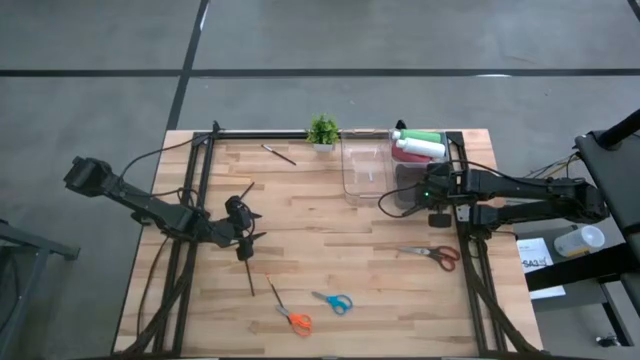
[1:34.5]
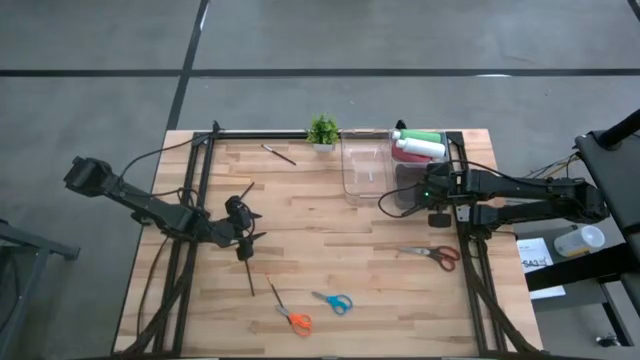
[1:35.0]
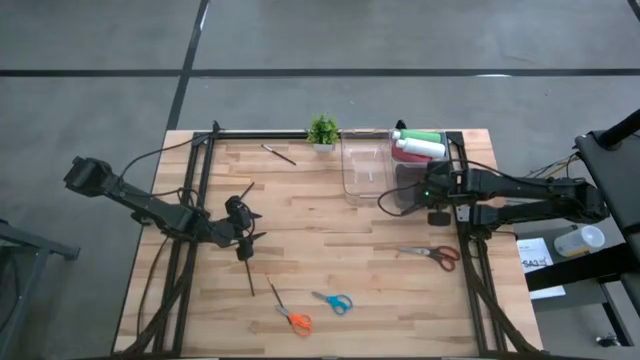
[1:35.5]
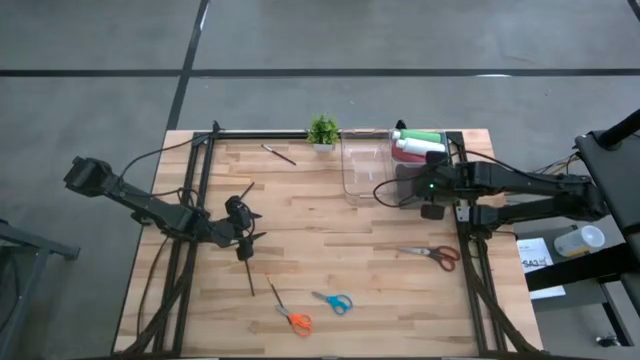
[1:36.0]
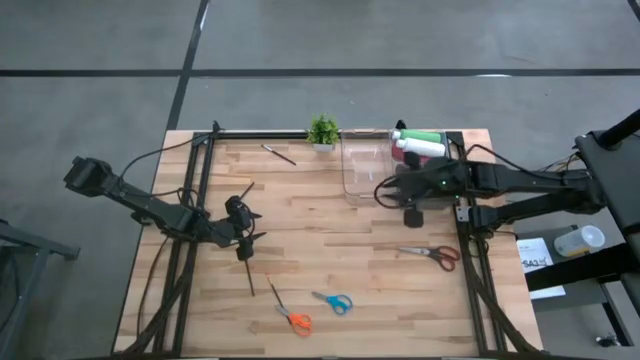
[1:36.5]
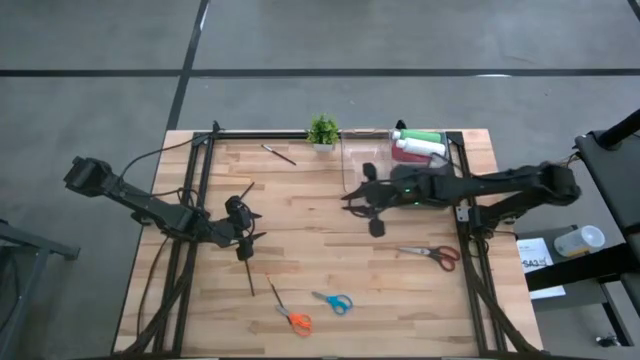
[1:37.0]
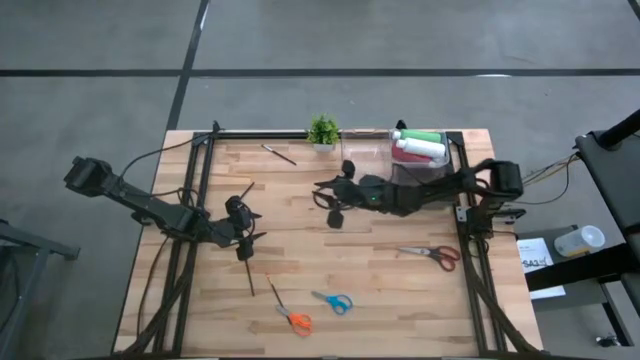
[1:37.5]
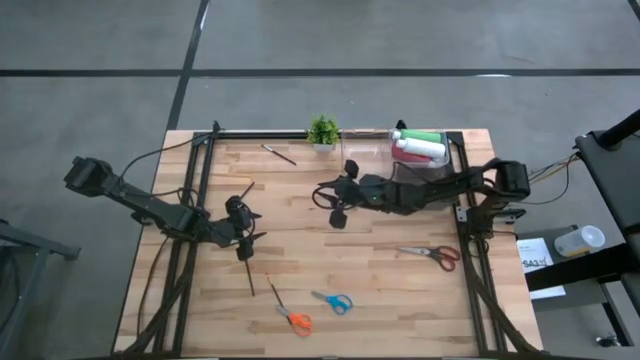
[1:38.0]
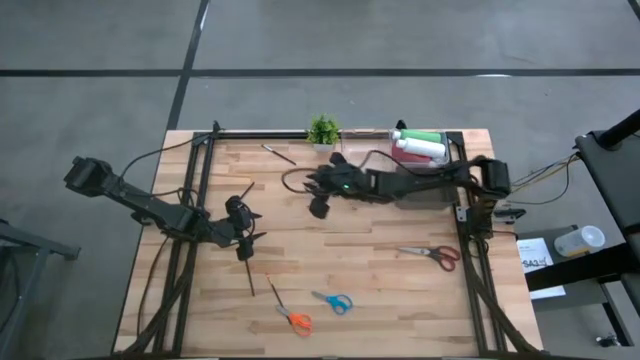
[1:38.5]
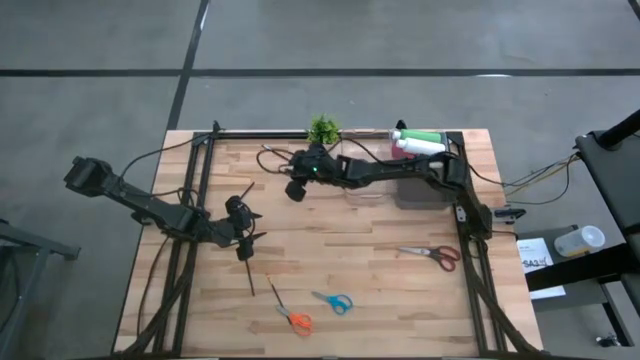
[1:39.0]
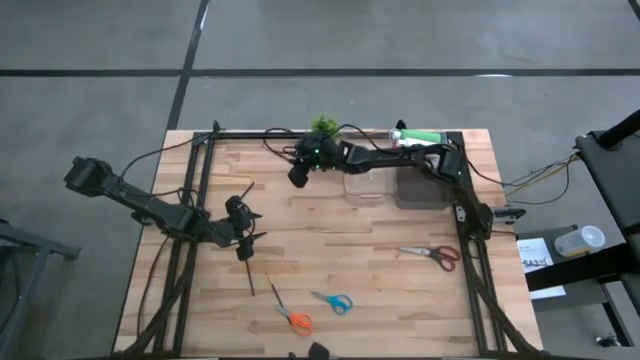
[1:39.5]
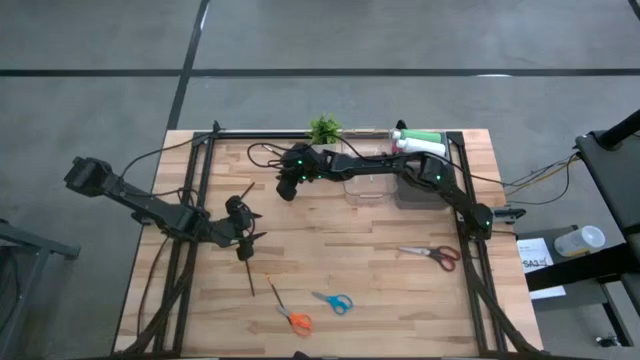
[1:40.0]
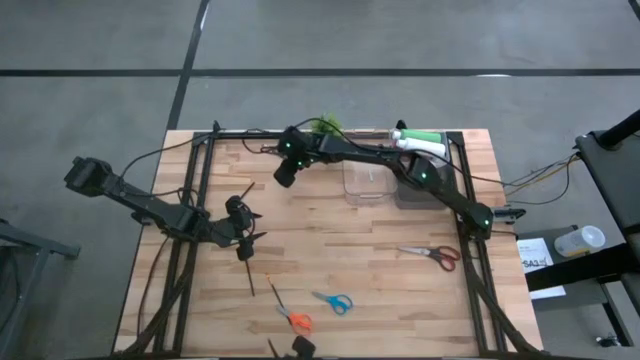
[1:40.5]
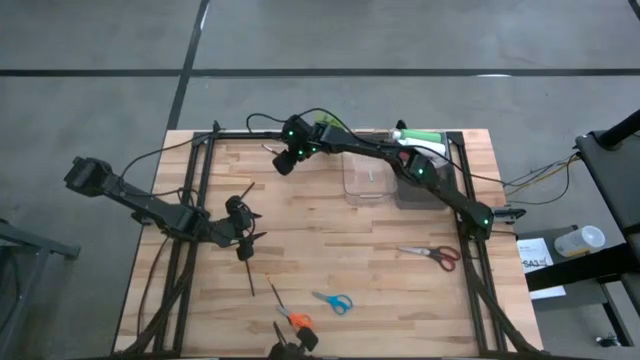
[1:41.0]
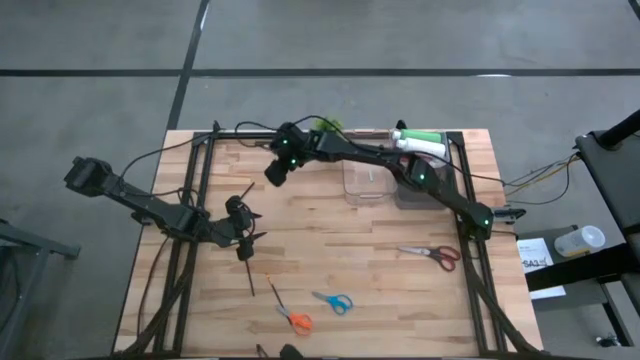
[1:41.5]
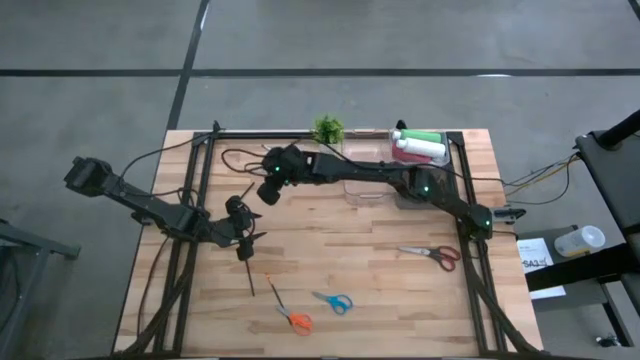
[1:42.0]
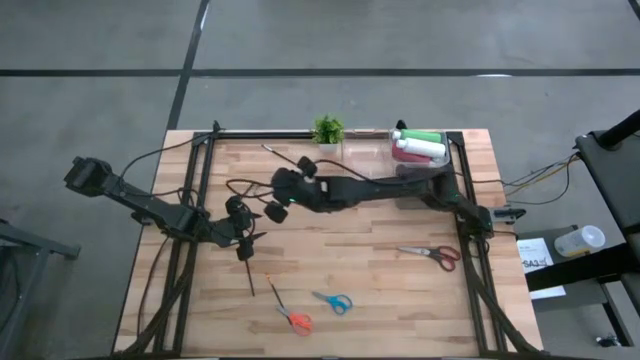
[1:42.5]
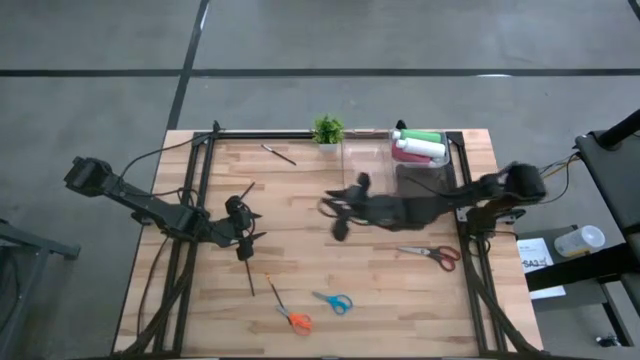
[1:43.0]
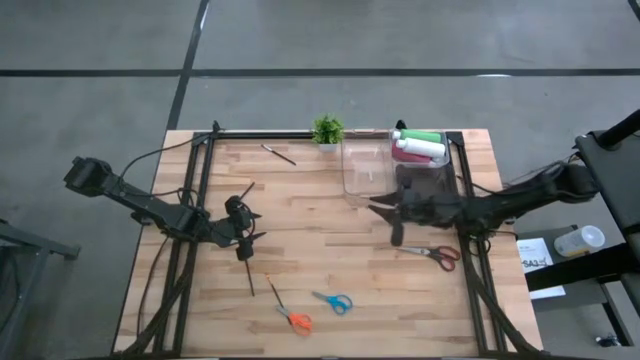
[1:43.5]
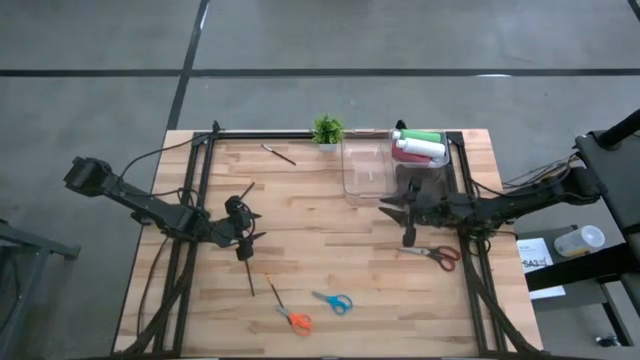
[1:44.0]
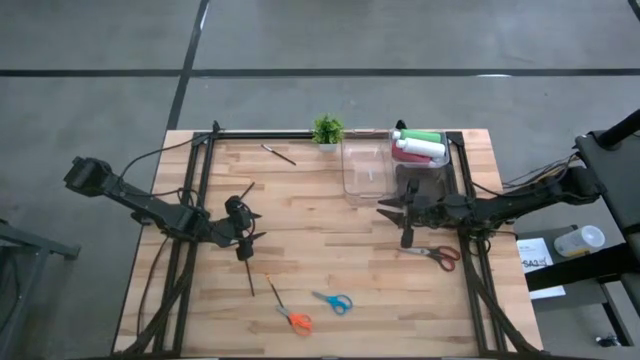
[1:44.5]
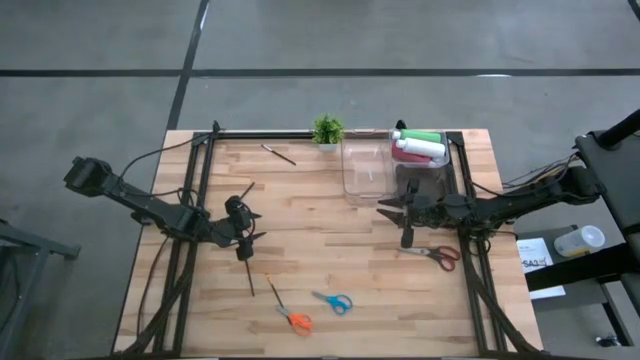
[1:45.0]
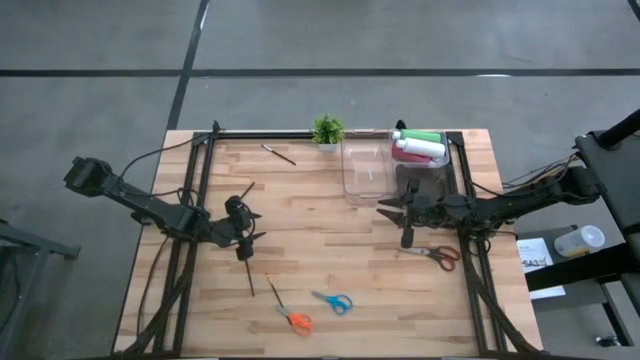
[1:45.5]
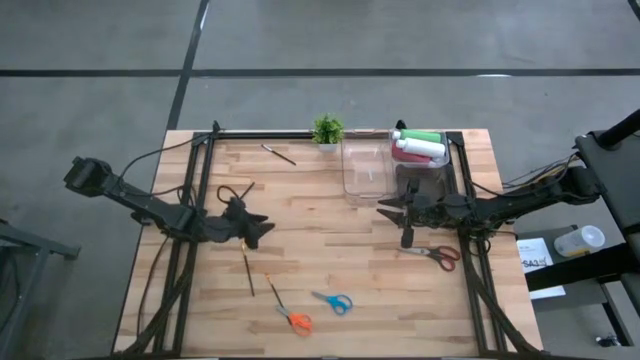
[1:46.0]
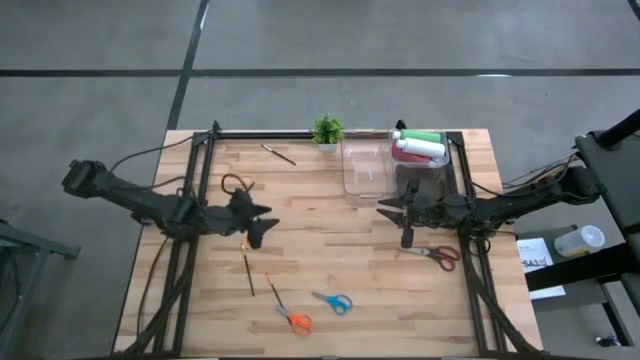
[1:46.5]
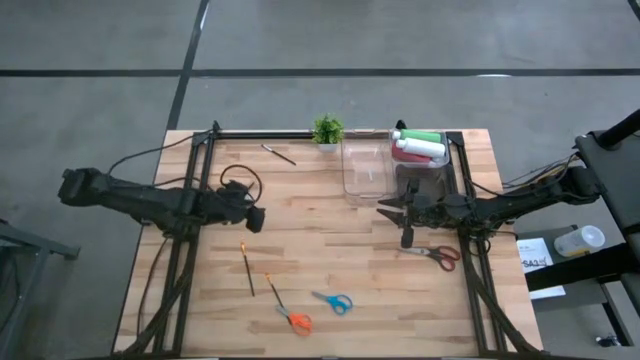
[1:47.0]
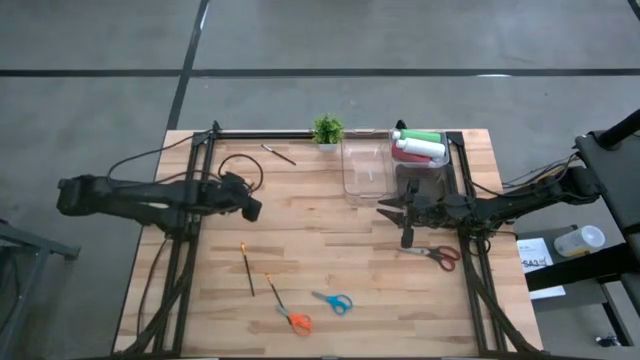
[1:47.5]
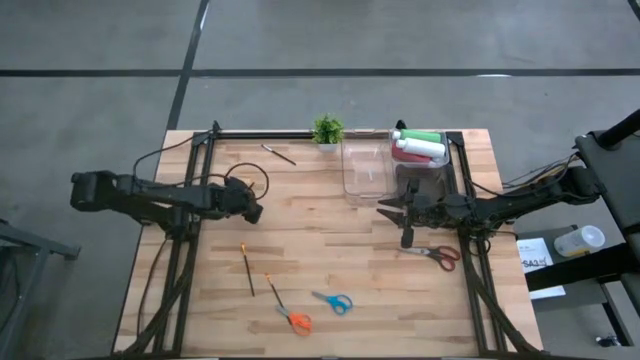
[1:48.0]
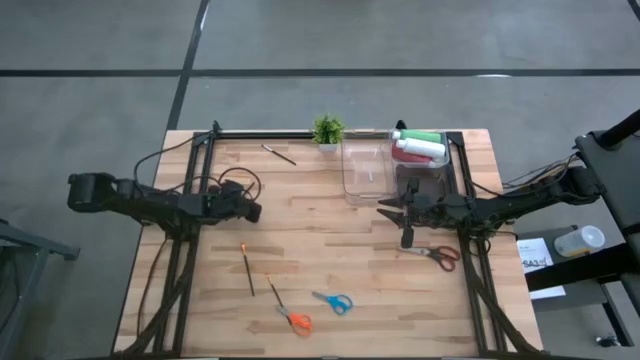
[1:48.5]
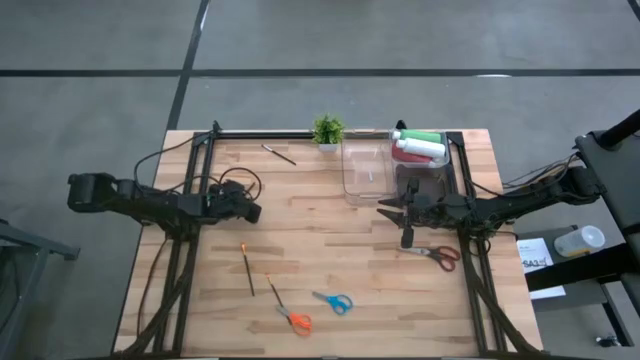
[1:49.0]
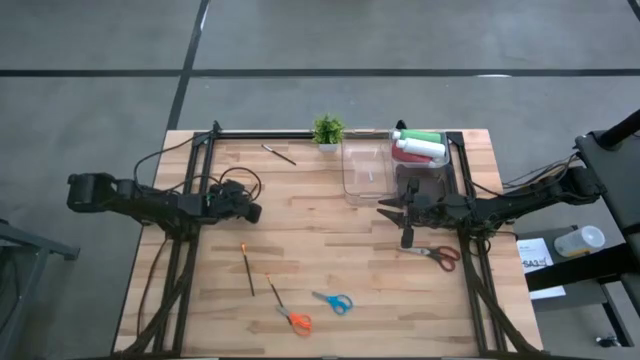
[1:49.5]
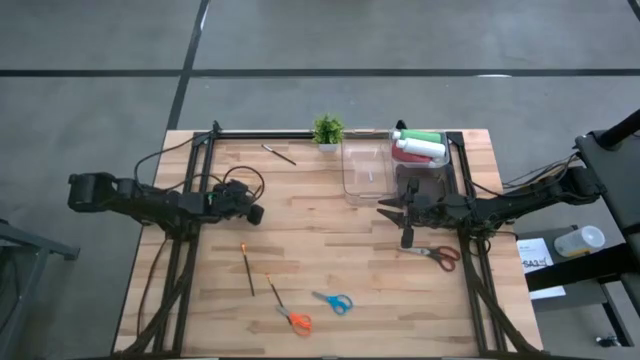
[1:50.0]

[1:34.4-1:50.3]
Task: Pick & Place Paint Supplies
Put the bottom silver paintbrush into the black bin

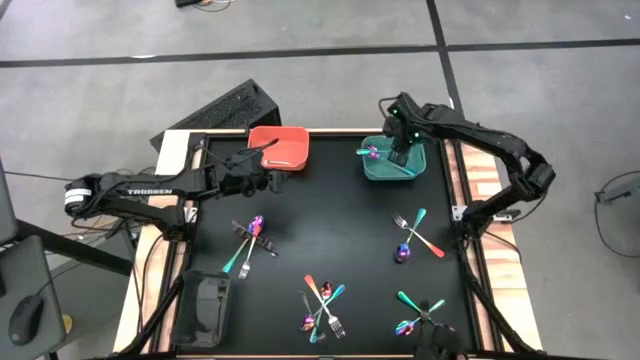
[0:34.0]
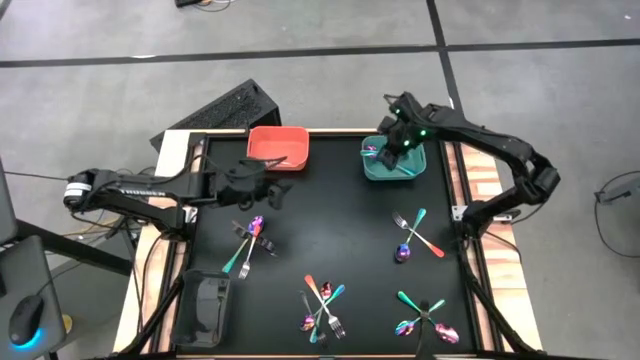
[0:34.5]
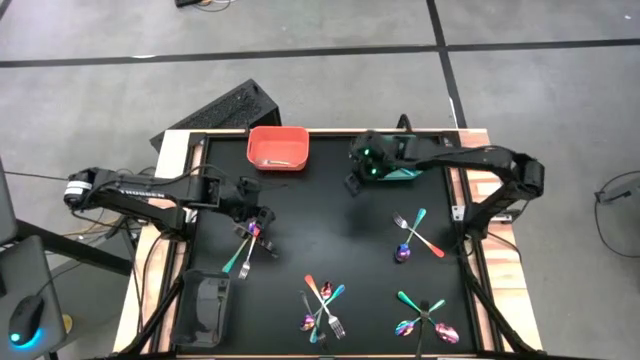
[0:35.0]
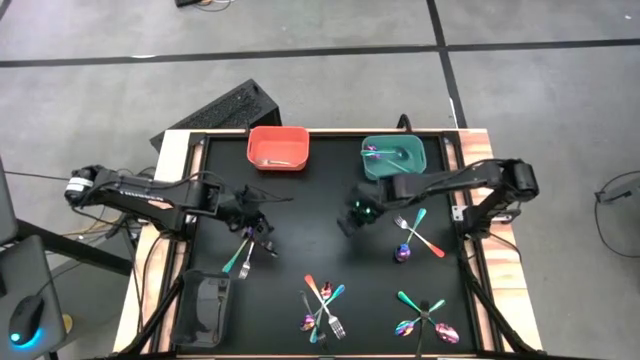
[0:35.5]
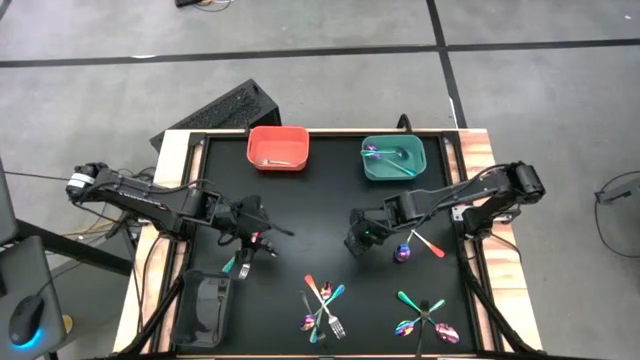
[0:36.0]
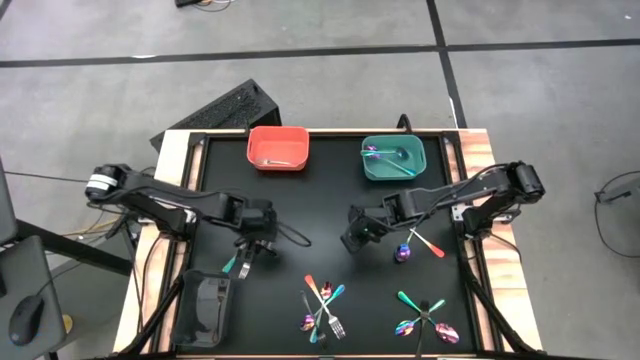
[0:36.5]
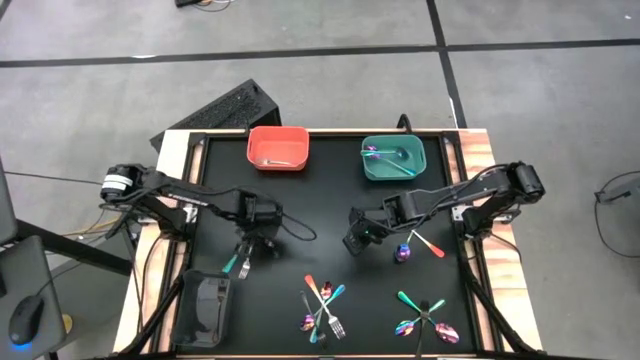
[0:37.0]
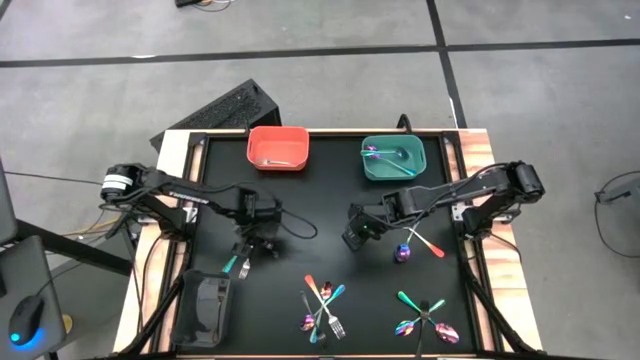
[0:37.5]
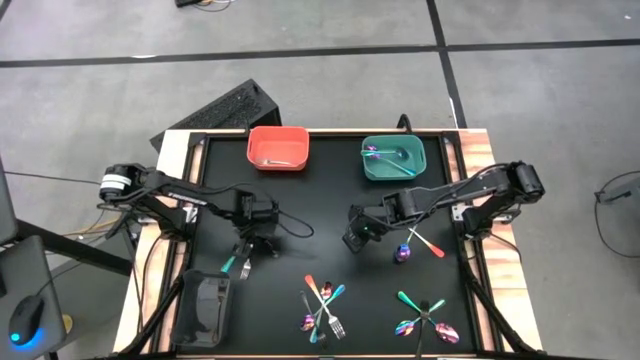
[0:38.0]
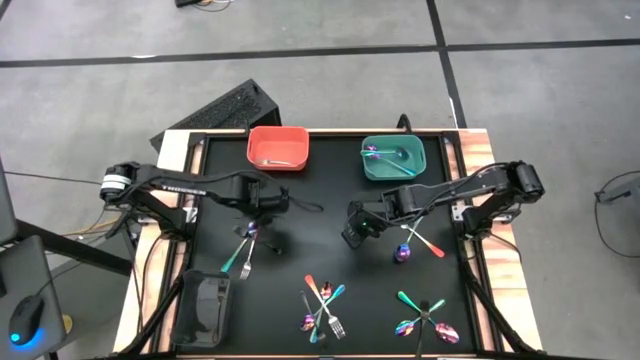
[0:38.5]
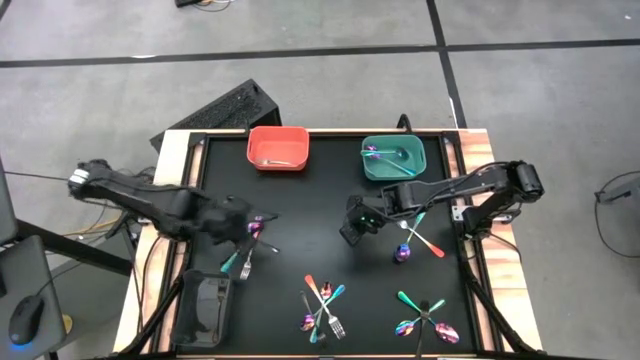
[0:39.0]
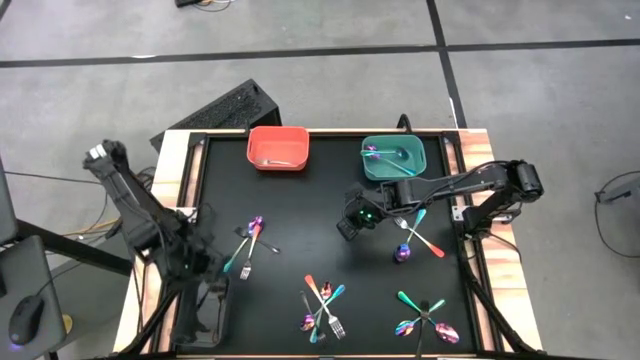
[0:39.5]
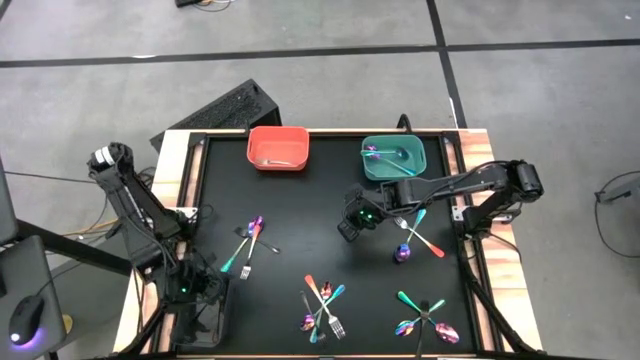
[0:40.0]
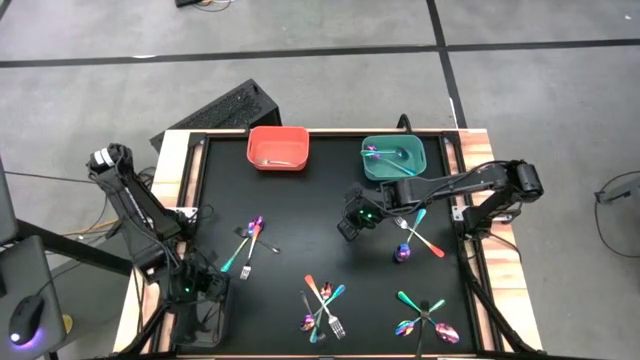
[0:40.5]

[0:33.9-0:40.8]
Task: Sort silverware by color (type)
Put the black fork into the black bin
